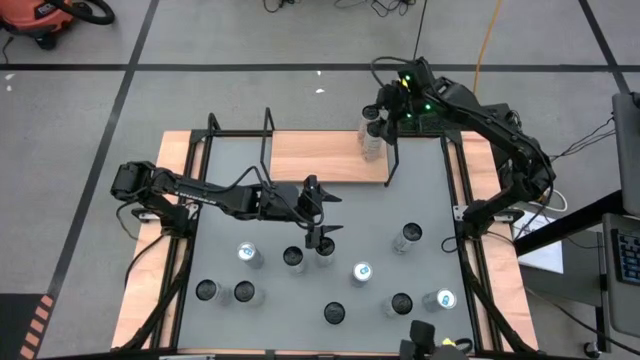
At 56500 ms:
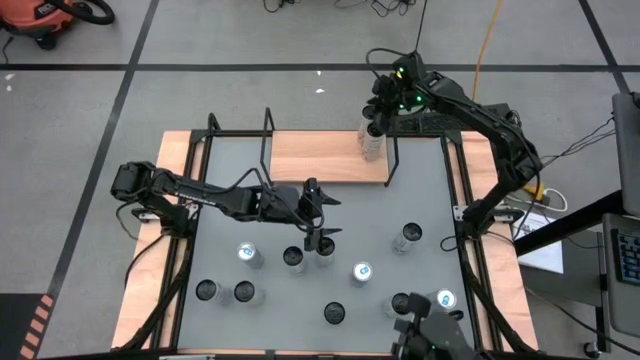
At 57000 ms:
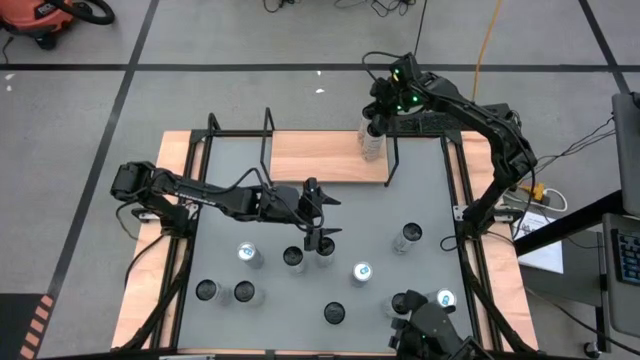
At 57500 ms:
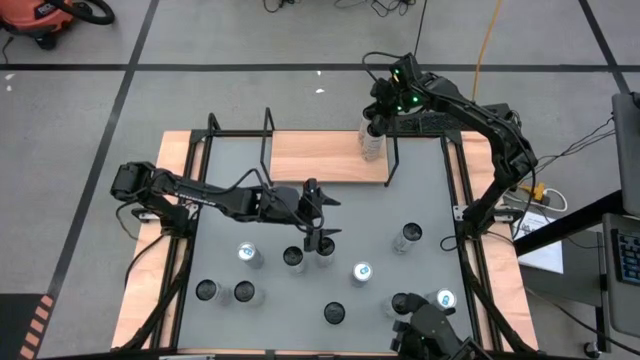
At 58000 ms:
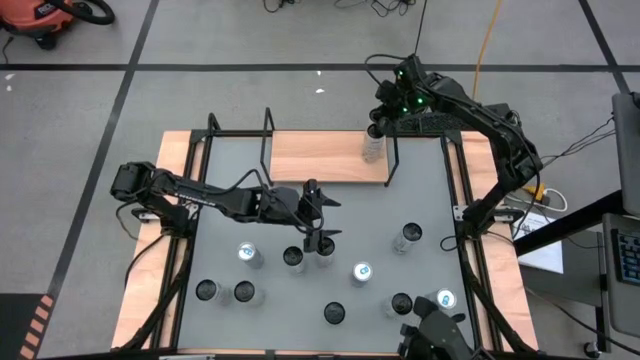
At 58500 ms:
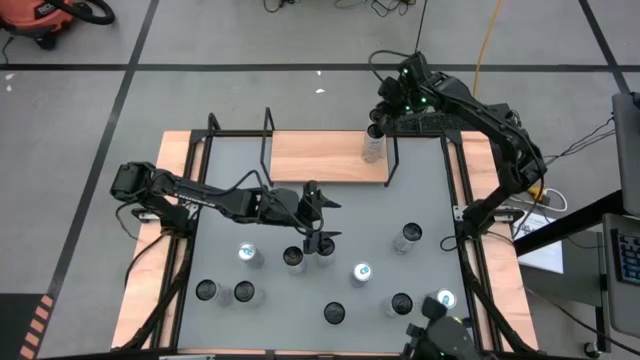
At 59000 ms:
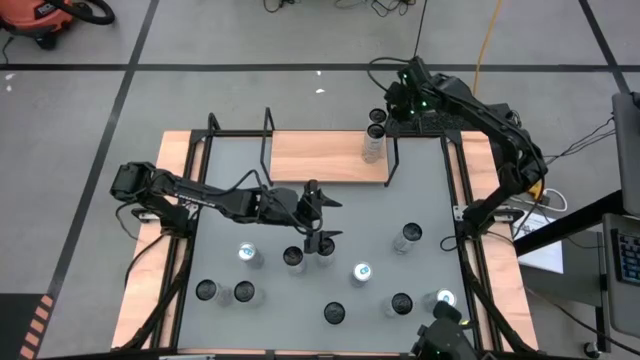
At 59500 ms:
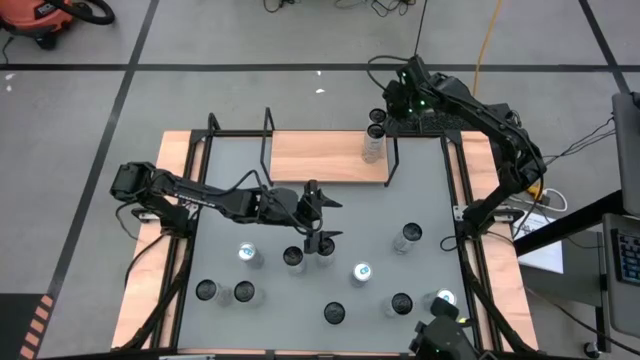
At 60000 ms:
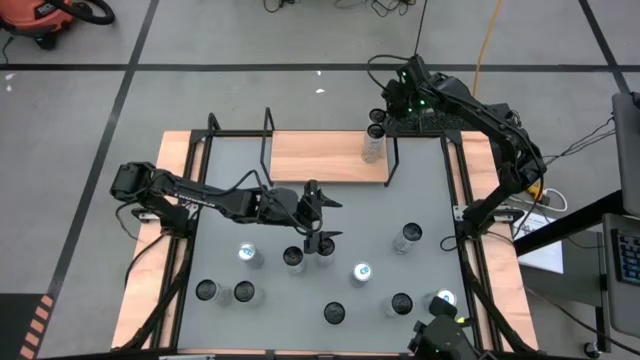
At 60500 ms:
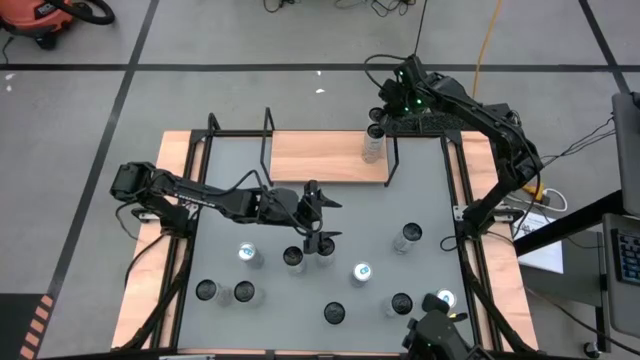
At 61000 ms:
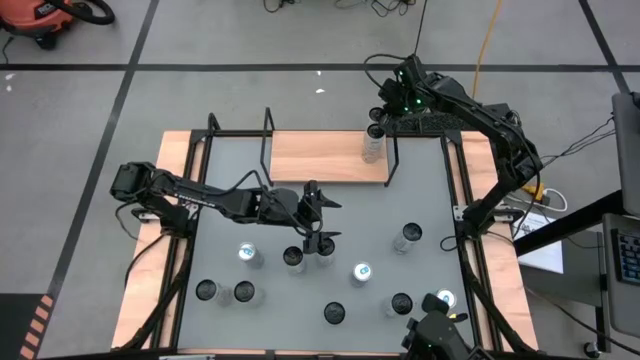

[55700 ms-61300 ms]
Task: Place canned beverage on shelf
Adjust the white yellow soda can on the shelf

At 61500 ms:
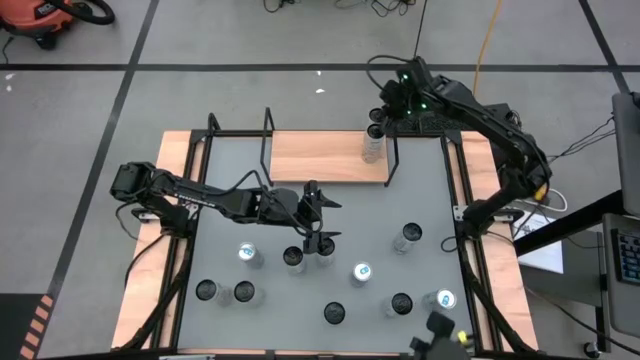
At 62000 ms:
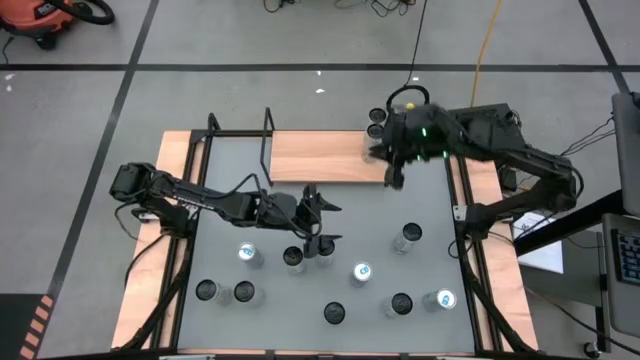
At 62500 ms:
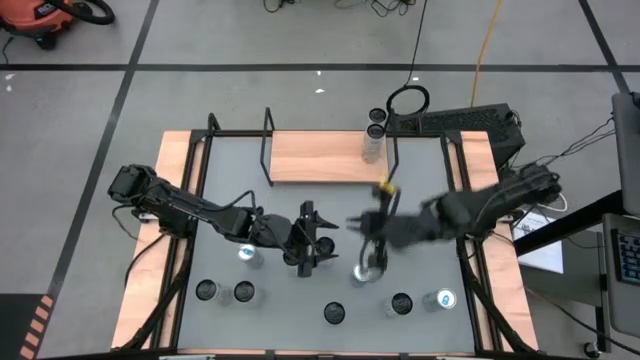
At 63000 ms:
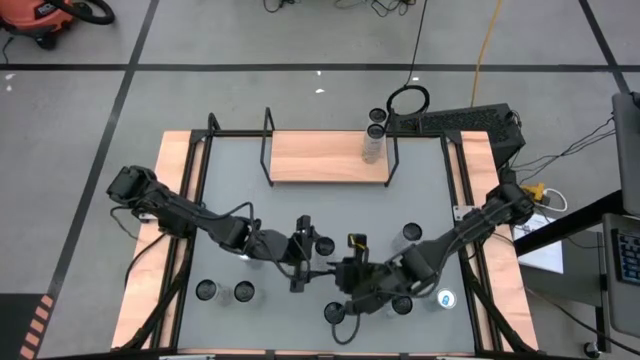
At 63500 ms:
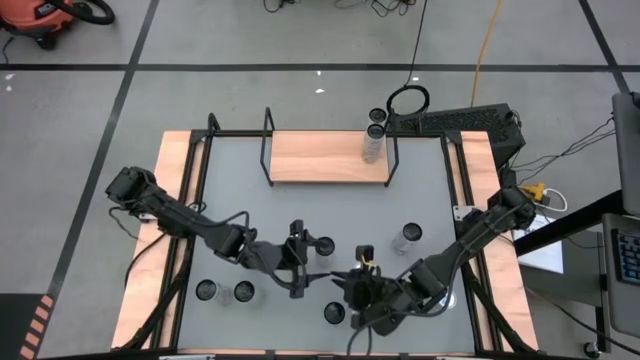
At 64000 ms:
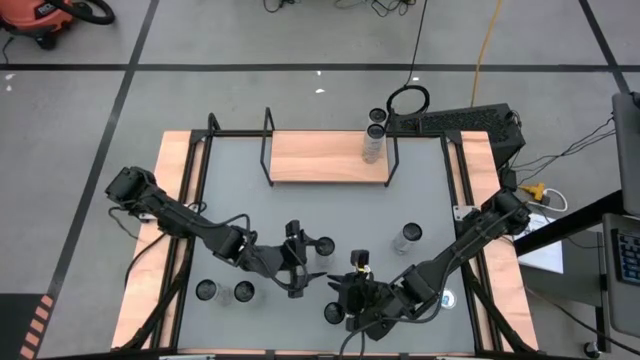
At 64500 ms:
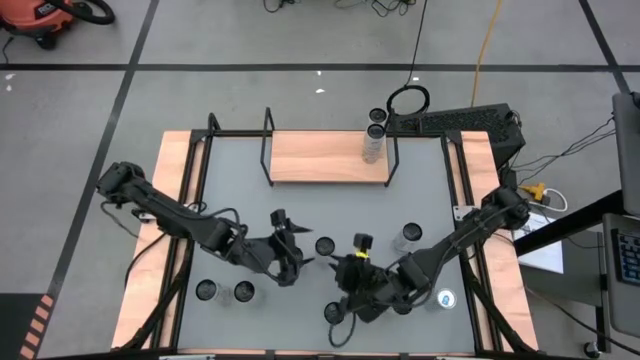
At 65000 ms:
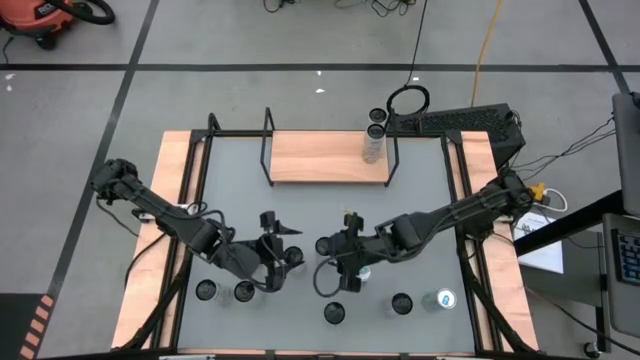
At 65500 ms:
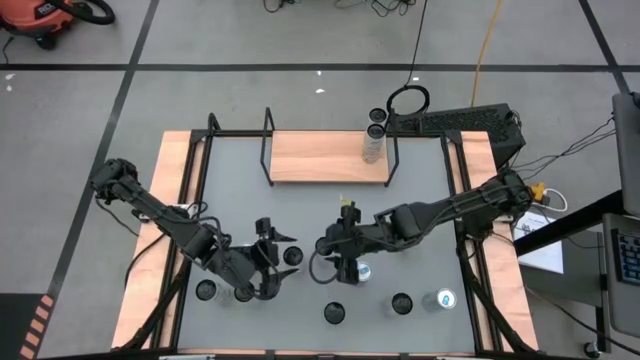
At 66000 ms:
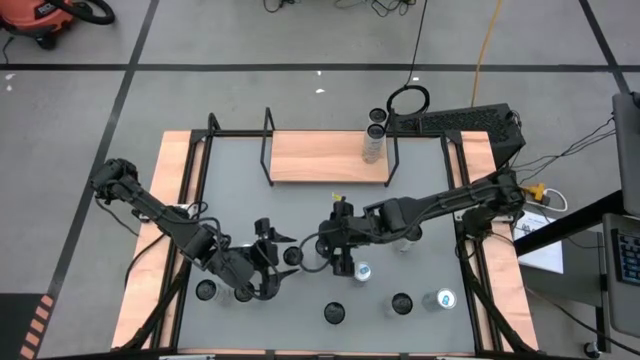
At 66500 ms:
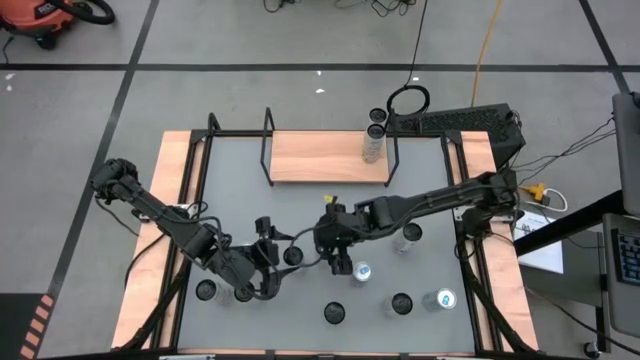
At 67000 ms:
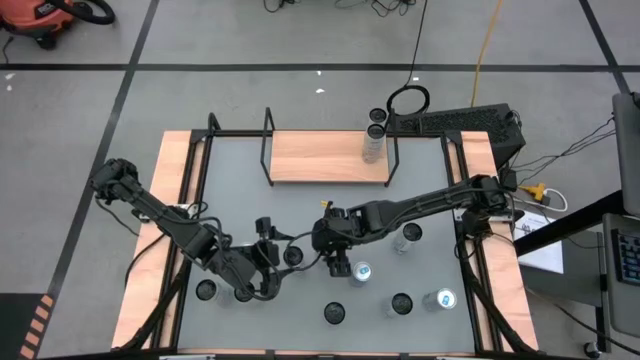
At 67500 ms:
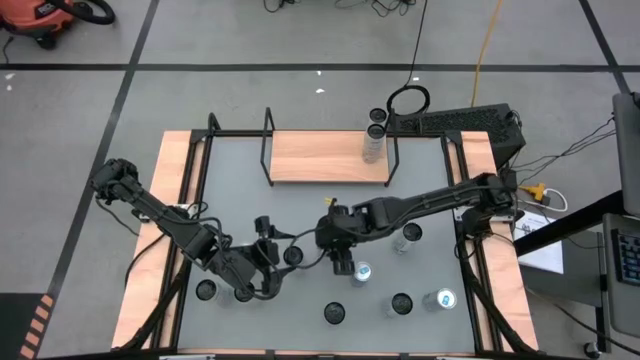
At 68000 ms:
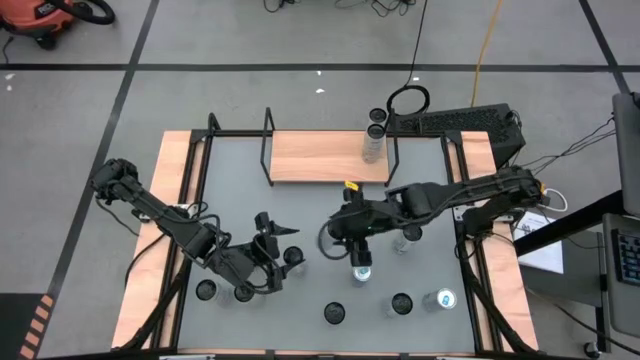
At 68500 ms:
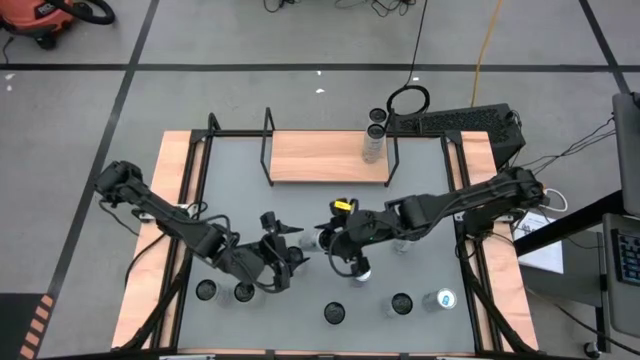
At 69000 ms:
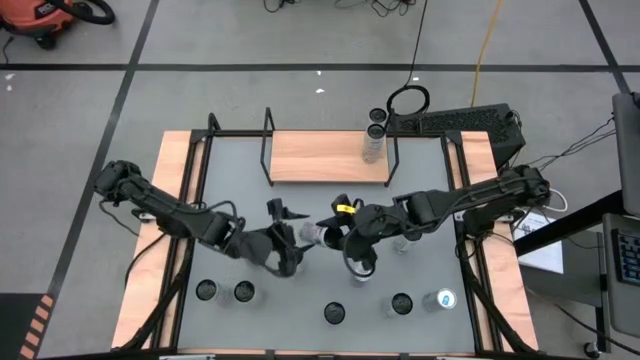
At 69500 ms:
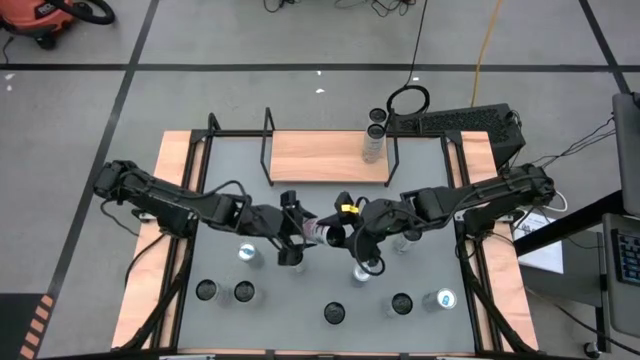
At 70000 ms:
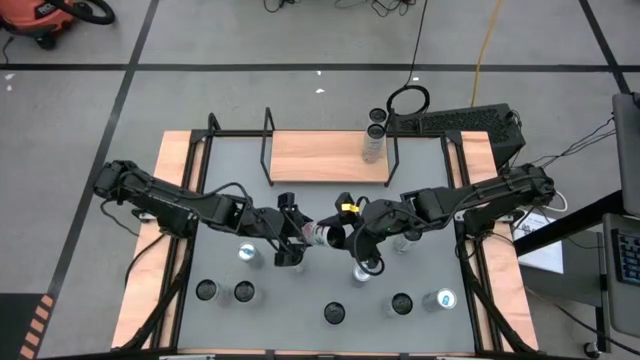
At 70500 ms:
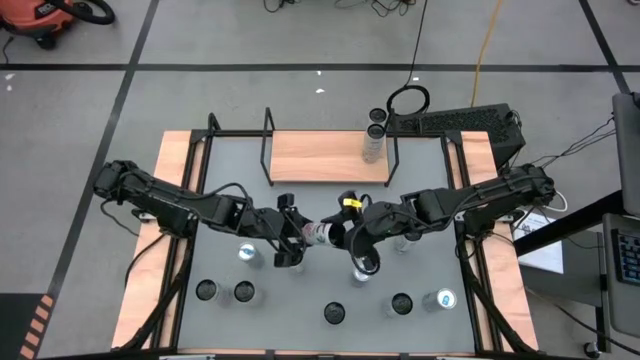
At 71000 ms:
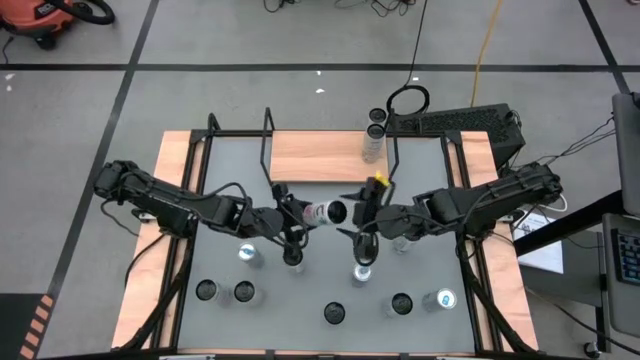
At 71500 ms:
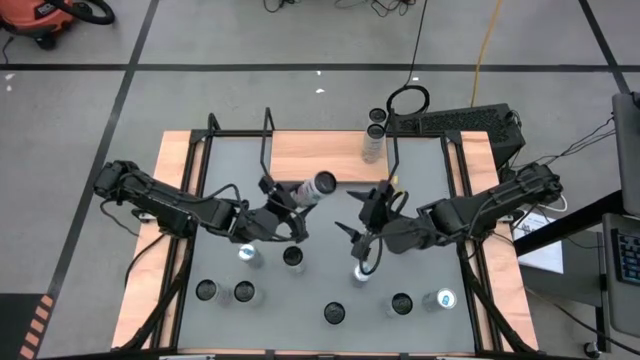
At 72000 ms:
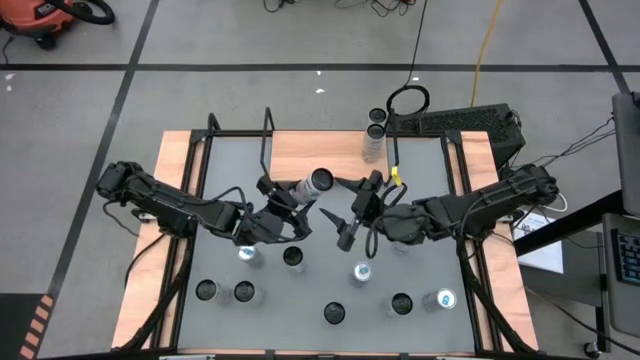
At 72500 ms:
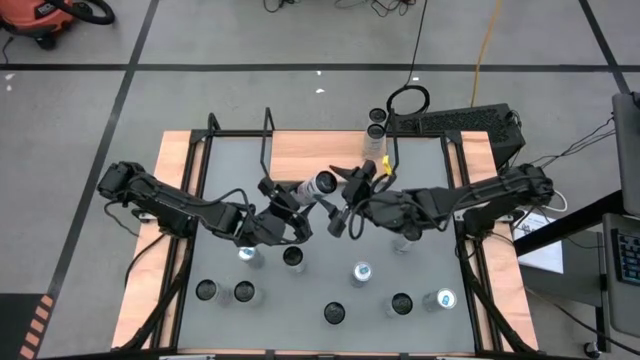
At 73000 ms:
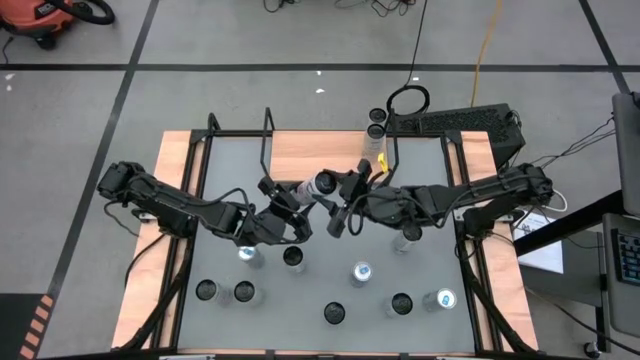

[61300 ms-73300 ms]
Put the top white pink soda can on the shelf

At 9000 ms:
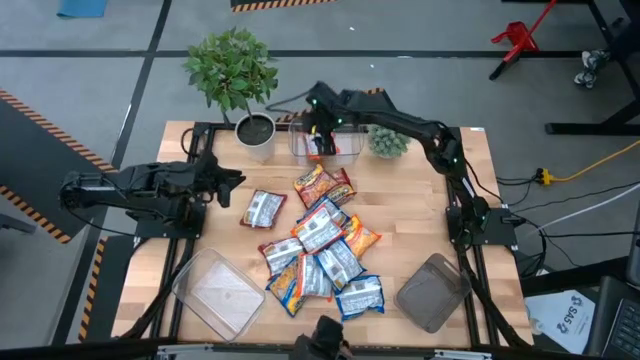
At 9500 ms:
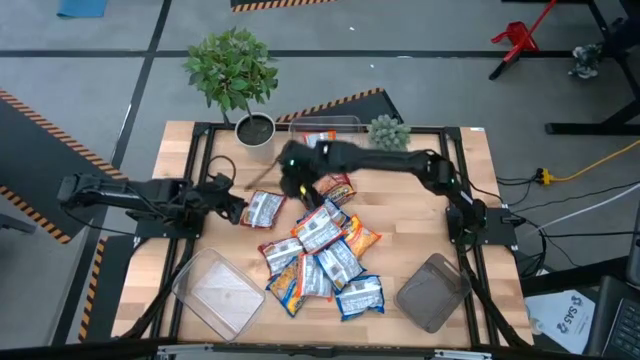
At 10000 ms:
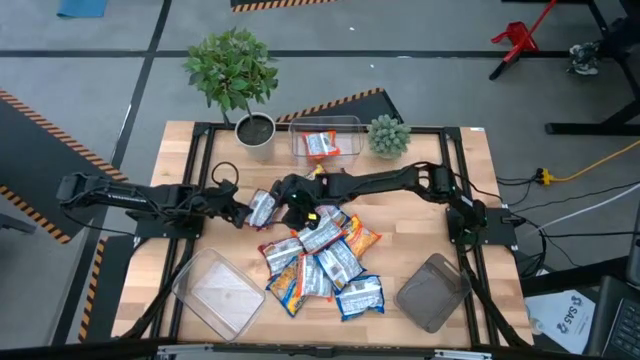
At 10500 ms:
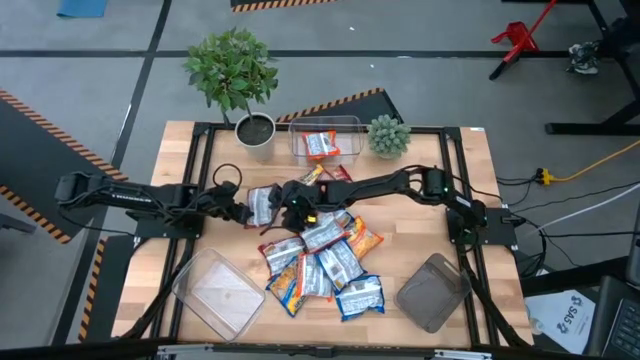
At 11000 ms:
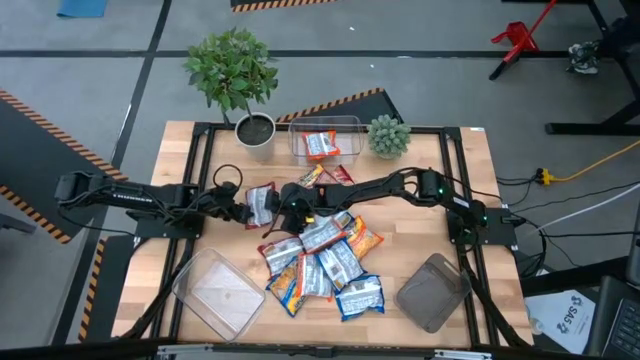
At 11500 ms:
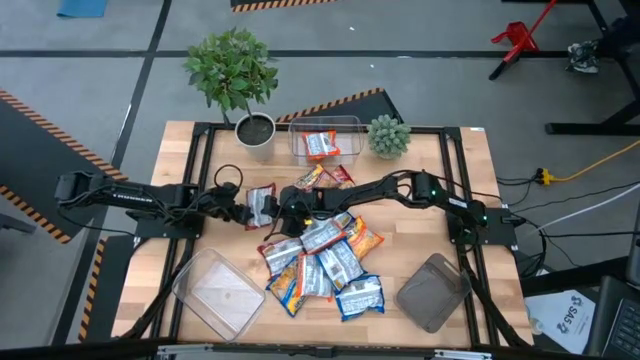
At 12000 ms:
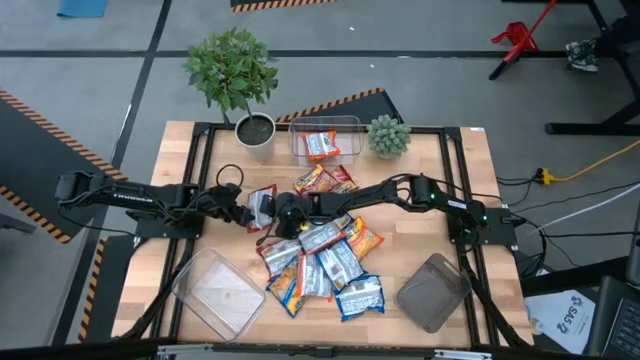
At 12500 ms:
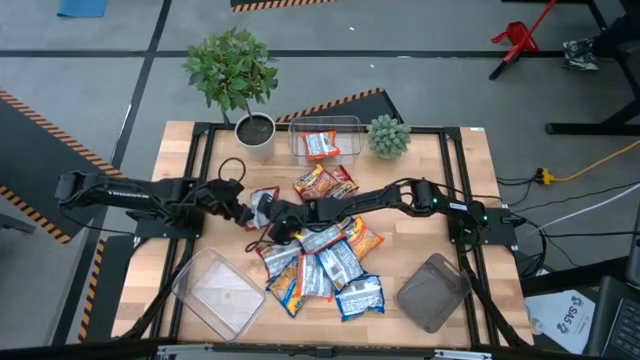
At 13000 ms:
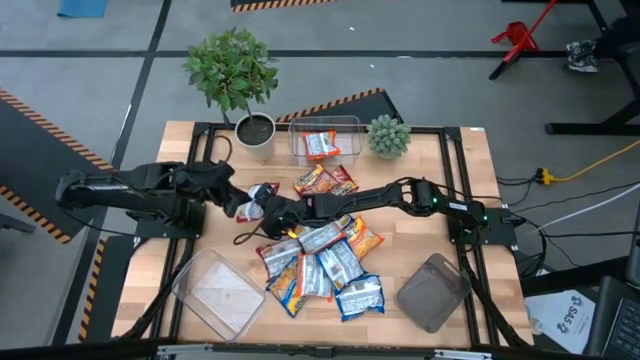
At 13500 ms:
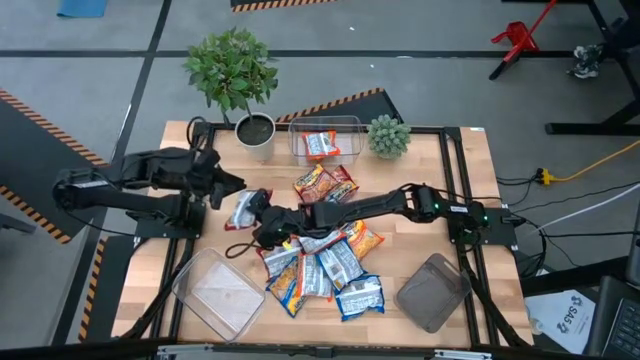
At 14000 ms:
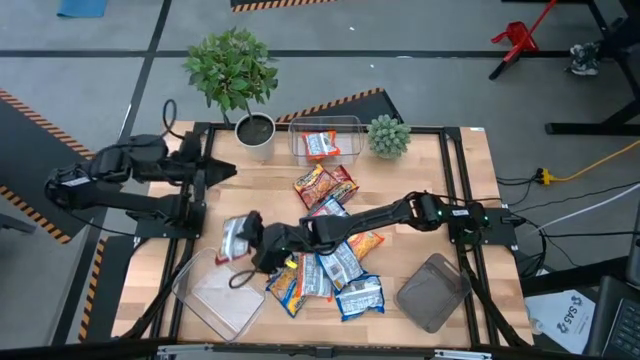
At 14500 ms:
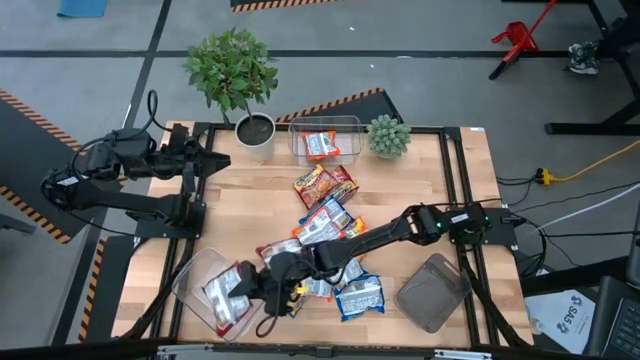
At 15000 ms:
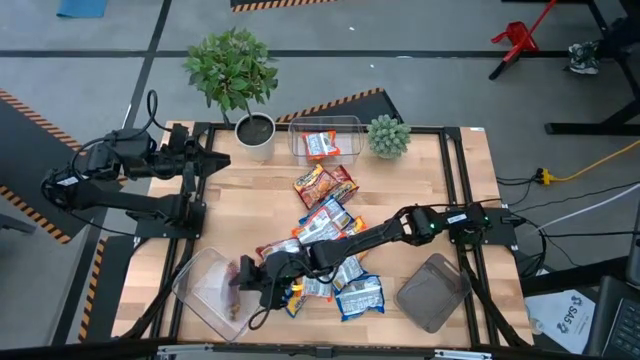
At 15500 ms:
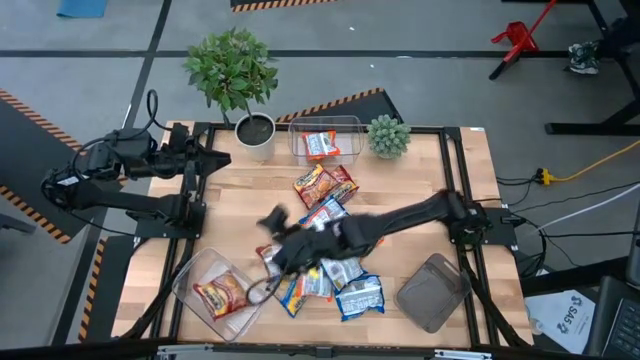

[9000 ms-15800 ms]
Task: Sort Maruchan noodles
Put the red noodle pack into the bottom transparent bin
